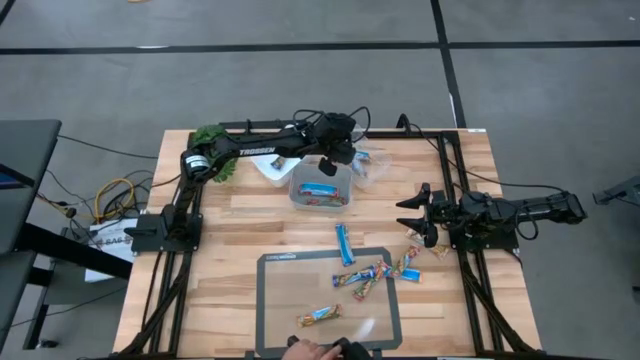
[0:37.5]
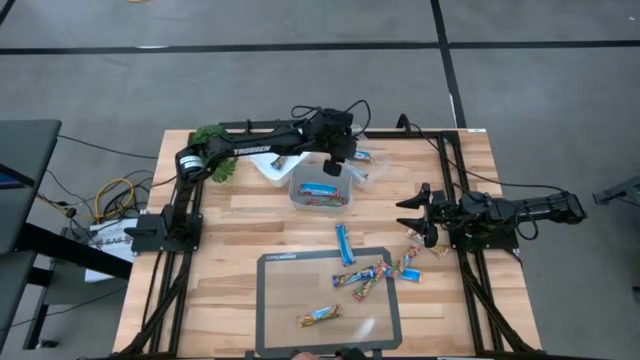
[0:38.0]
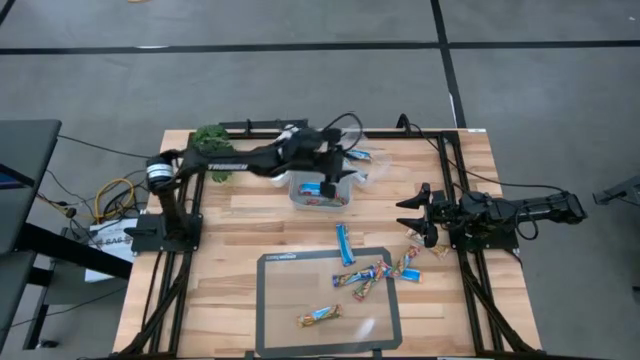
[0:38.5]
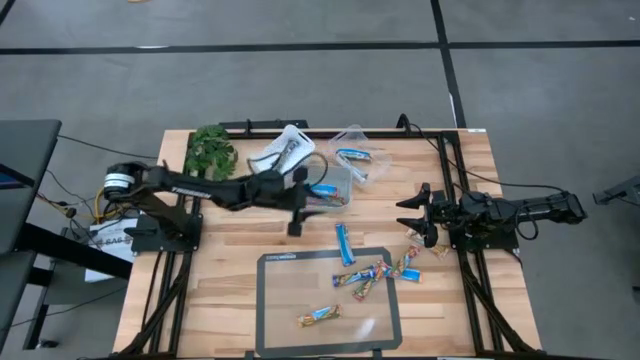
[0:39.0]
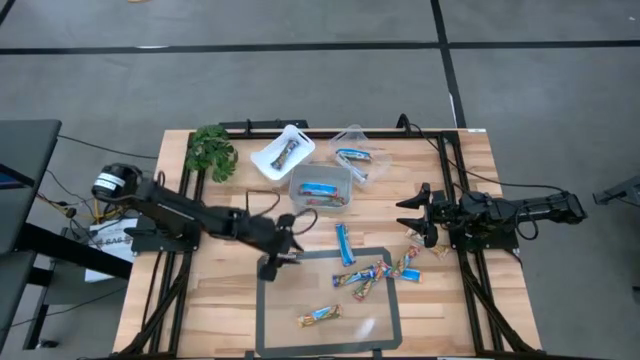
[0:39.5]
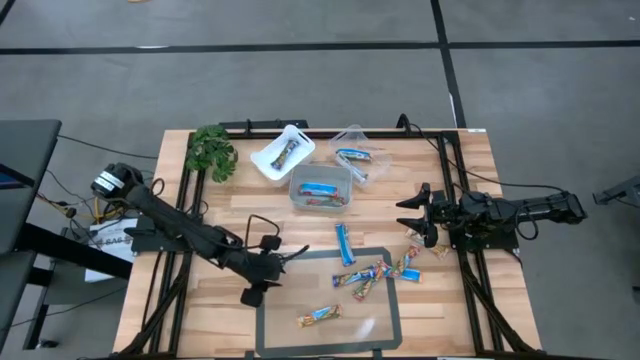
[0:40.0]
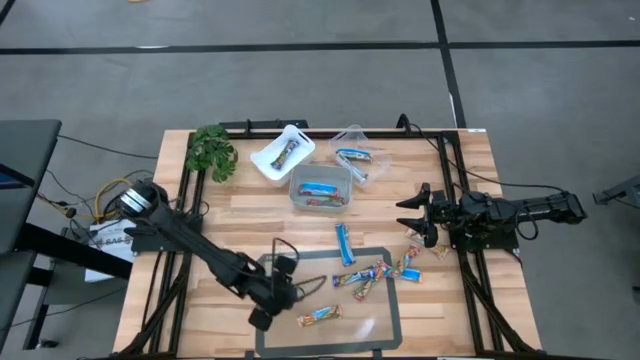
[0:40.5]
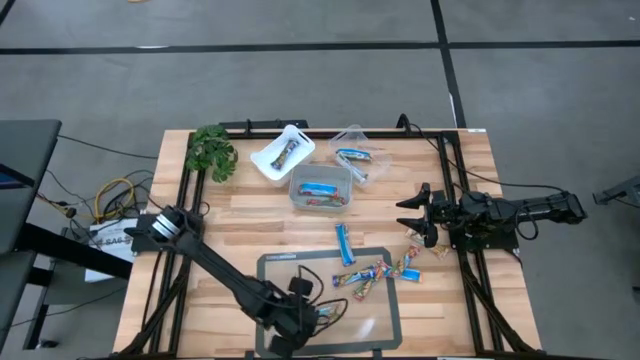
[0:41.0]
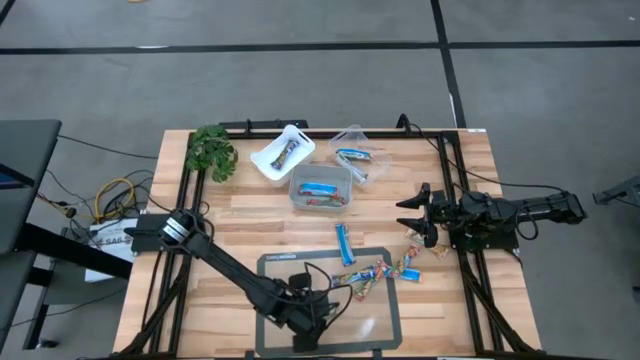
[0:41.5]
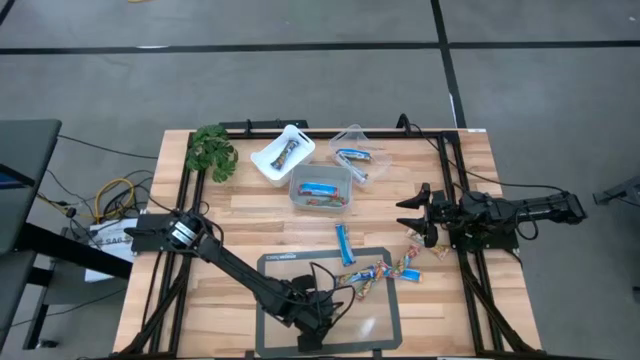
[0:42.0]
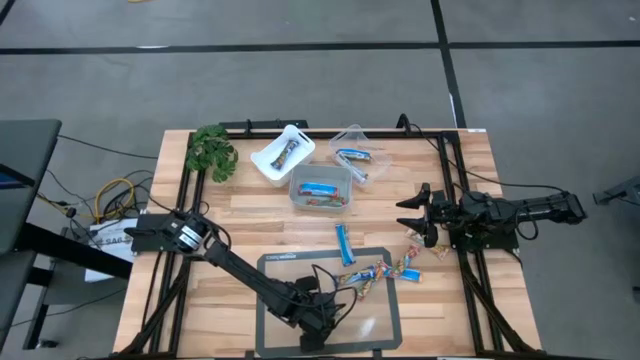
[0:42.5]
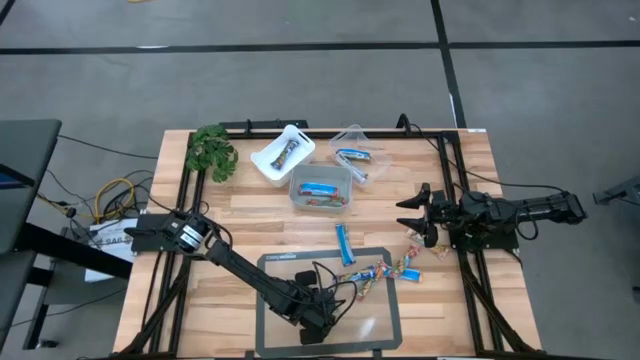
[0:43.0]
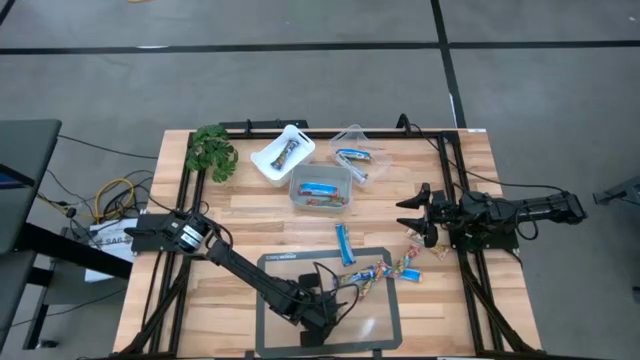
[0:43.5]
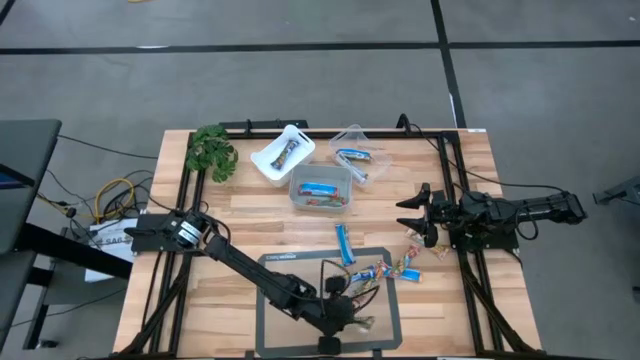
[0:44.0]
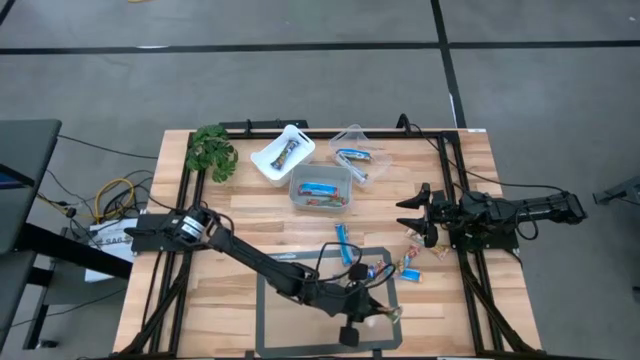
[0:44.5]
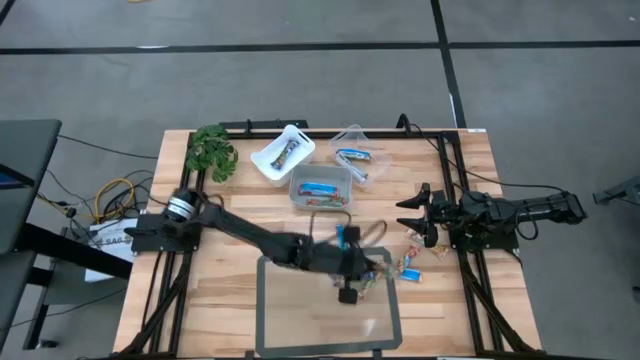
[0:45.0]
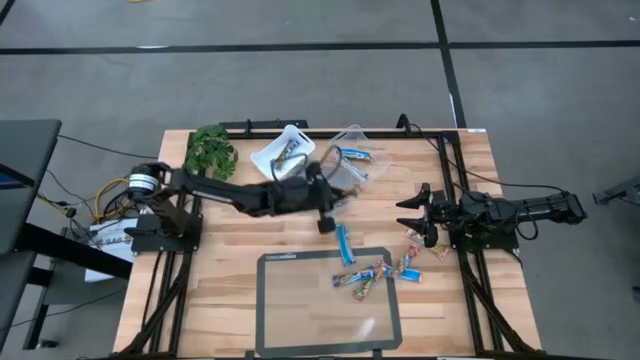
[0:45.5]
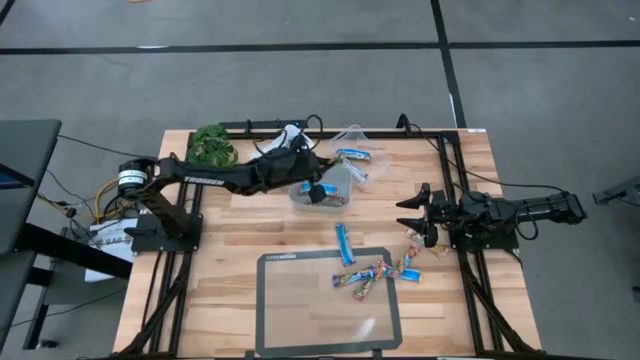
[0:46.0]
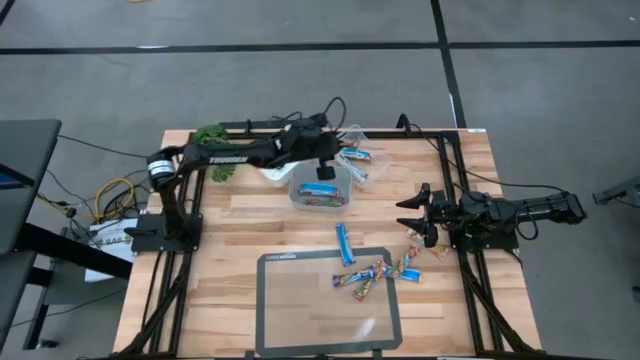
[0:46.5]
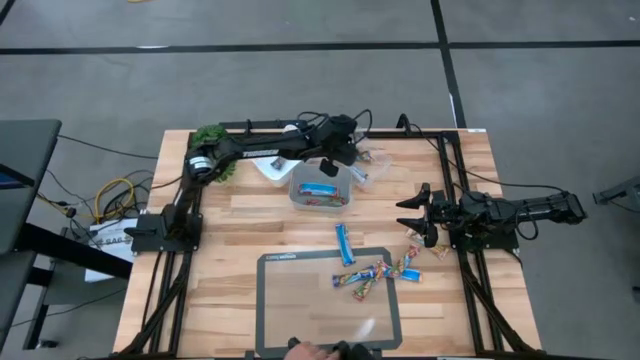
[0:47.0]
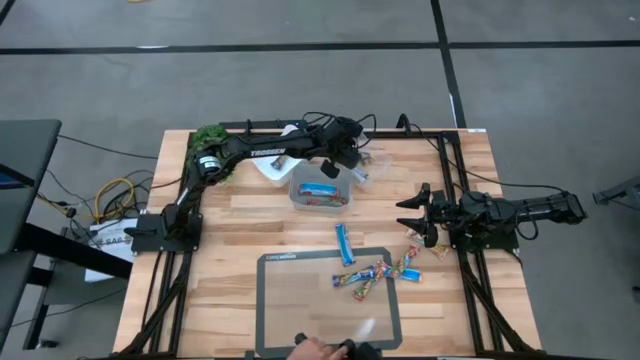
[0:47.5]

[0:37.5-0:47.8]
Task: Pick and place Granola Bars by type
Put the yellow granola bar into the transparent bin

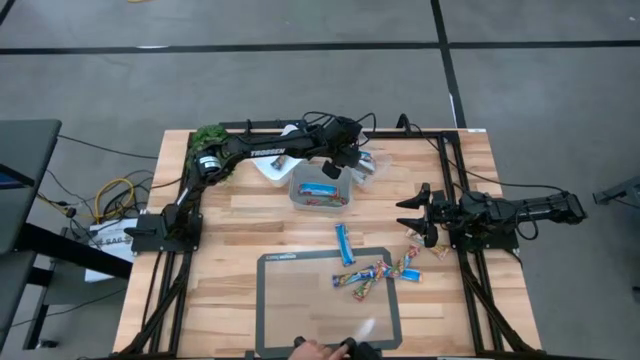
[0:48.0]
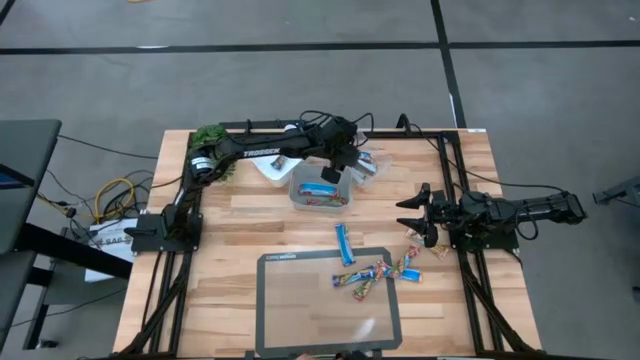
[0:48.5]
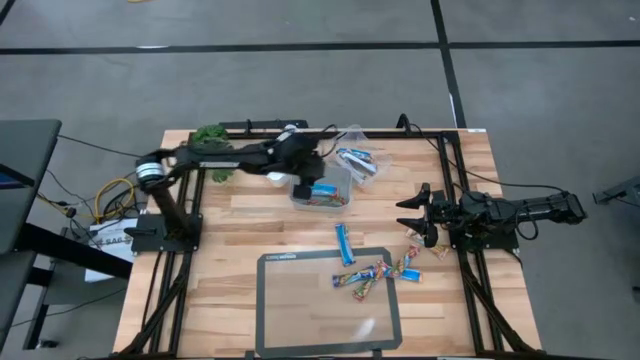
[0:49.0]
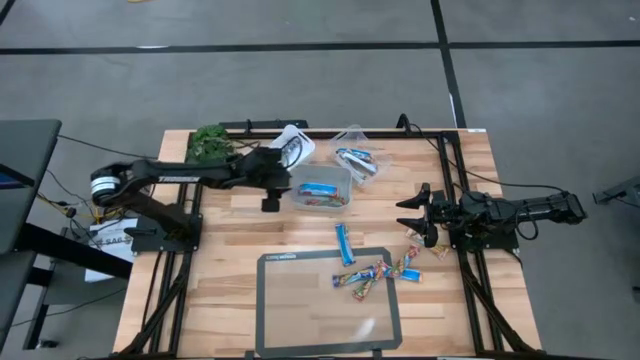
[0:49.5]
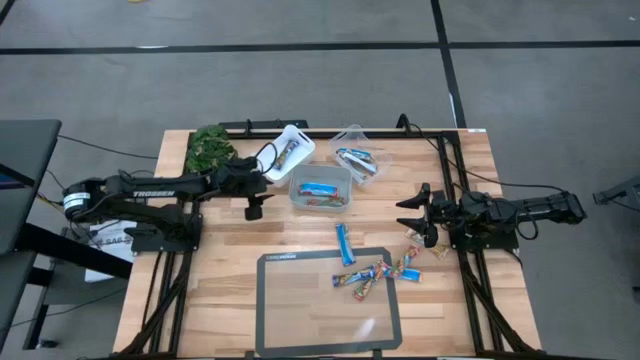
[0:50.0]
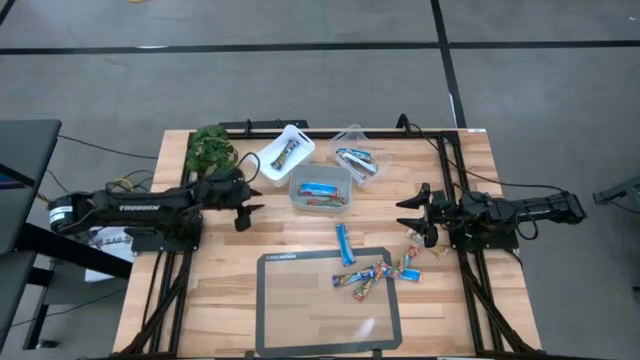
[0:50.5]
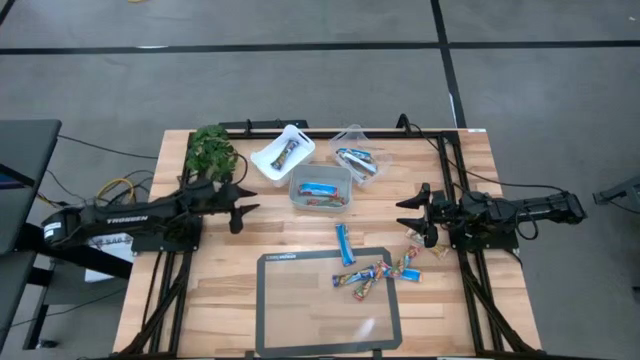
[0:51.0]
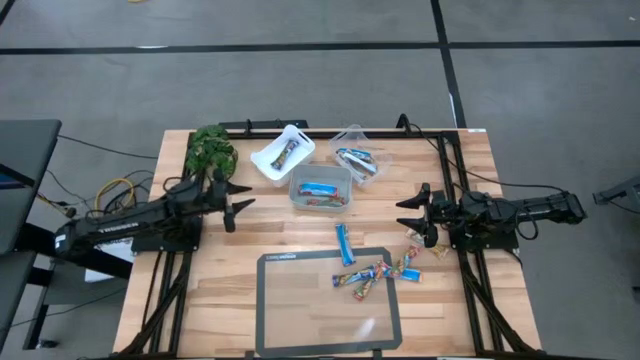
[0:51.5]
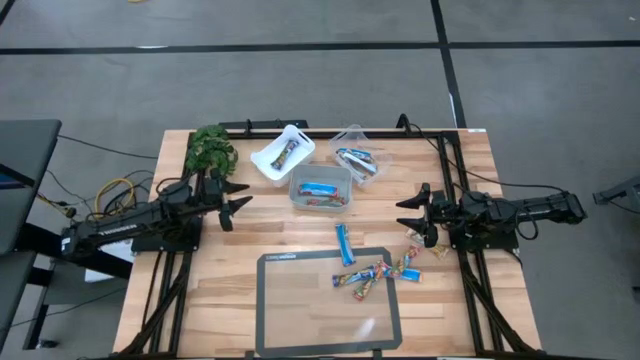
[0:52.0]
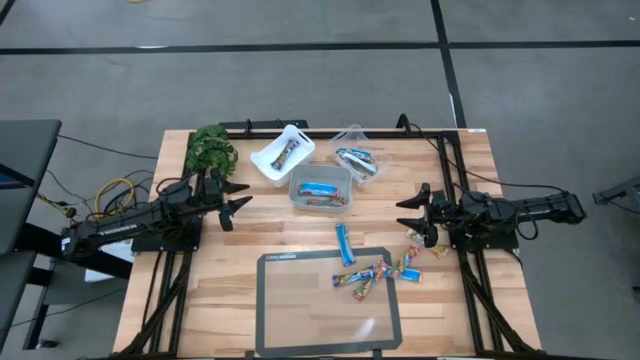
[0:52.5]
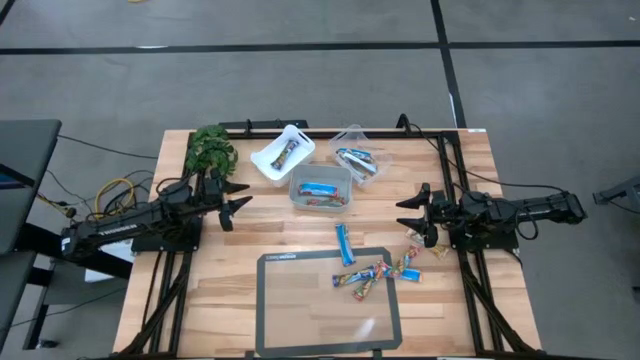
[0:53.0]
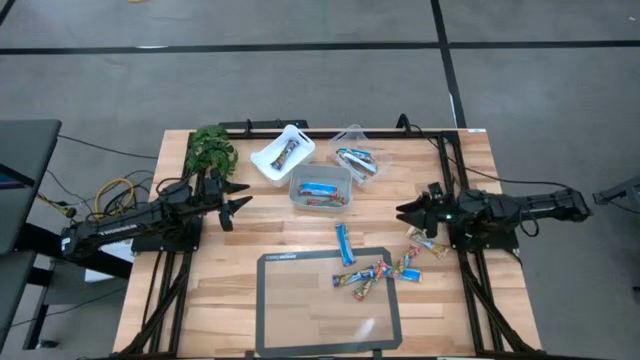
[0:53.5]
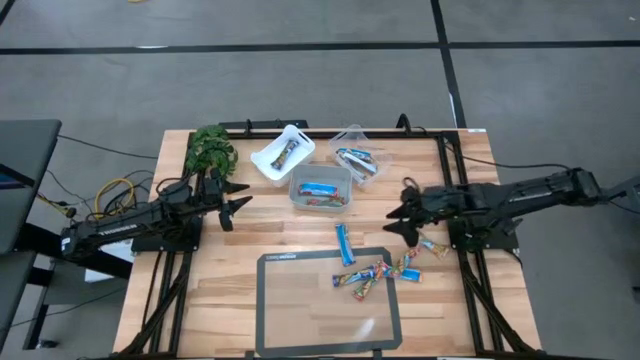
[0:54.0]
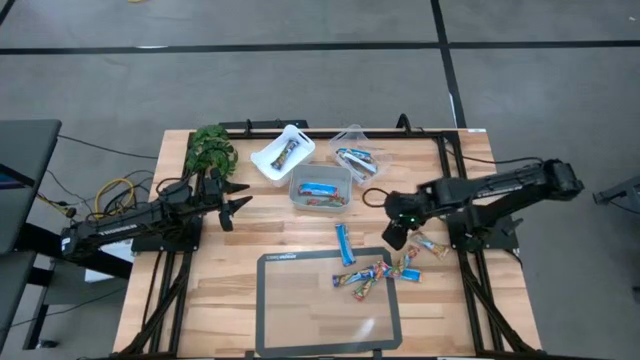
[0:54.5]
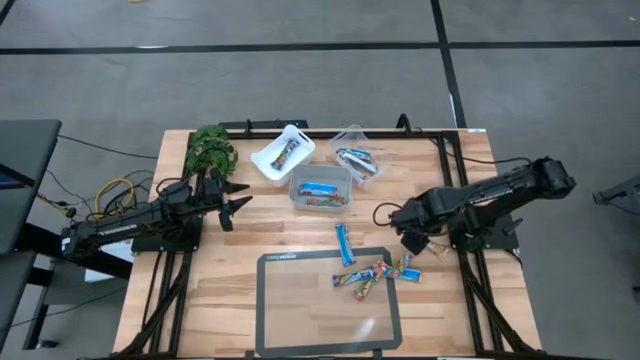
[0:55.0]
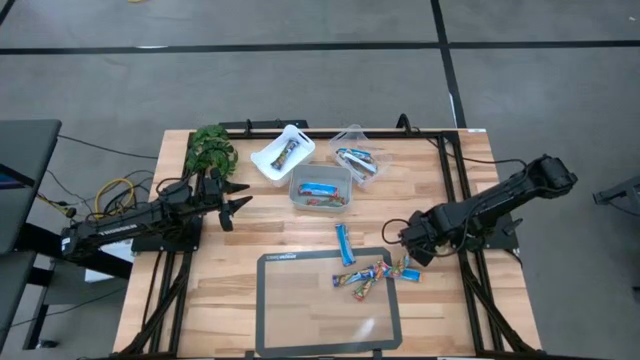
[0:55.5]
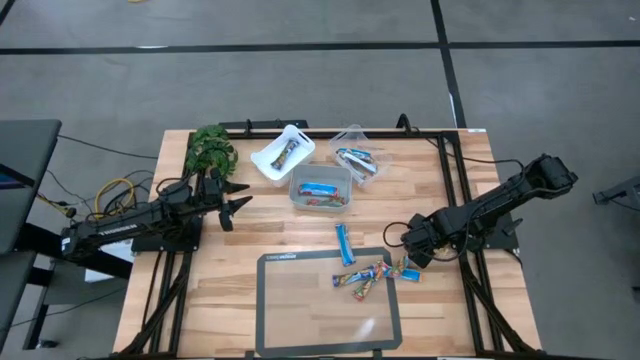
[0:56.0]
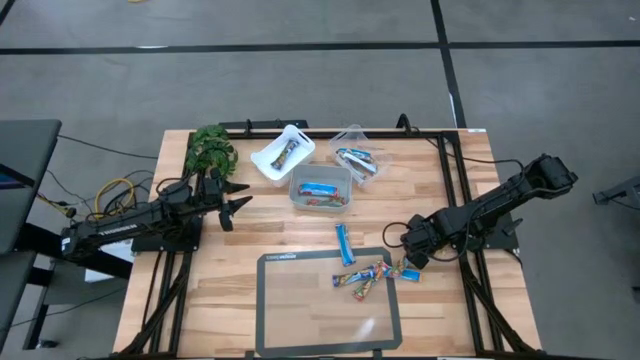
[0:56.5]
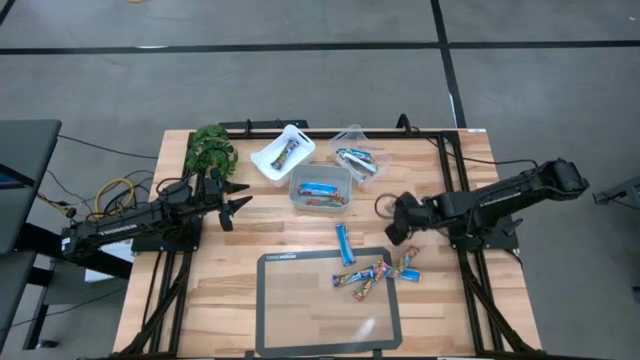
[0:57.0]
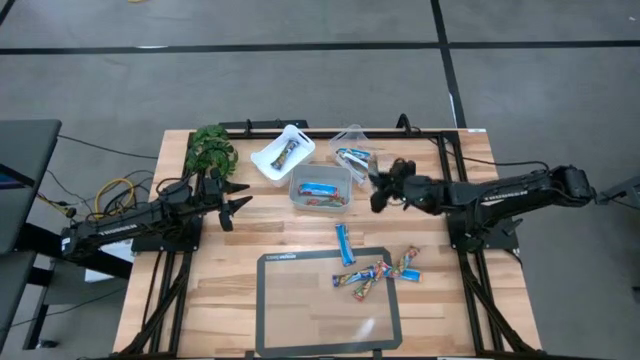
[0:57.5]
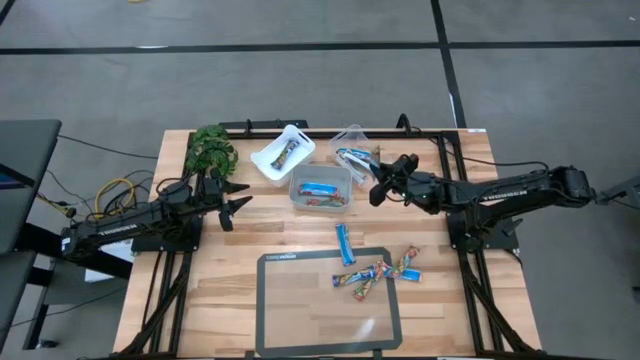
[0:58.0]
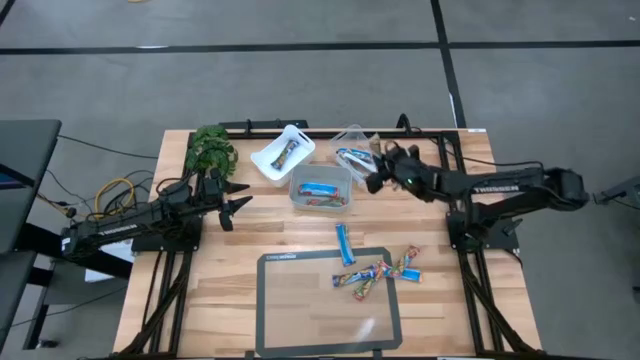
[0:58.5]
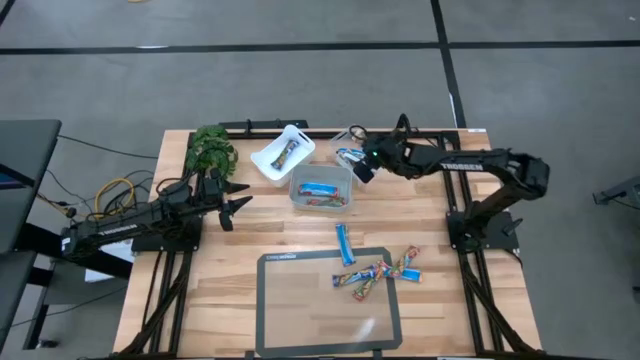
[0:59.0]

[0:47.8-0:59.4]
Put the yellow granola bar into the transparent bin
